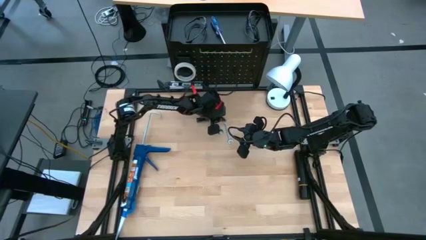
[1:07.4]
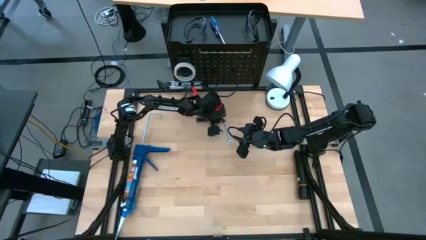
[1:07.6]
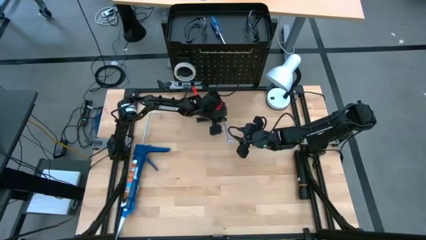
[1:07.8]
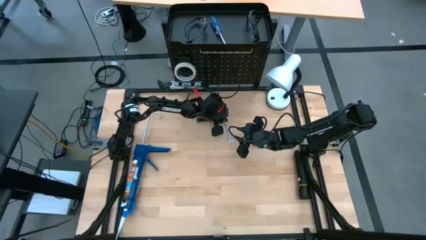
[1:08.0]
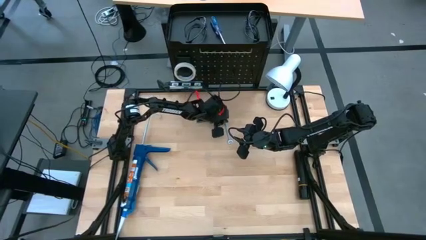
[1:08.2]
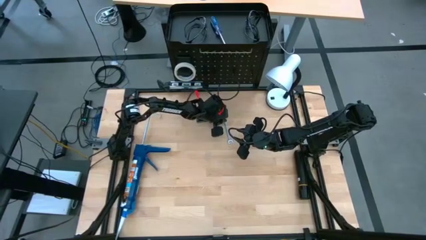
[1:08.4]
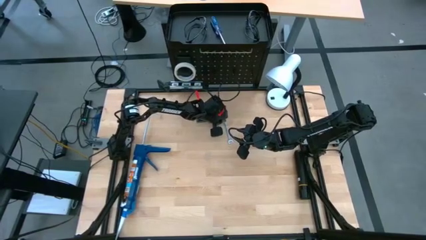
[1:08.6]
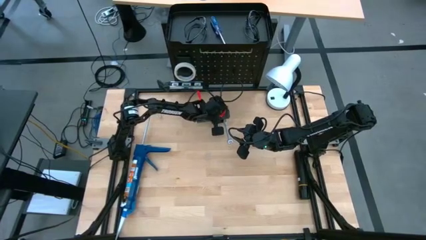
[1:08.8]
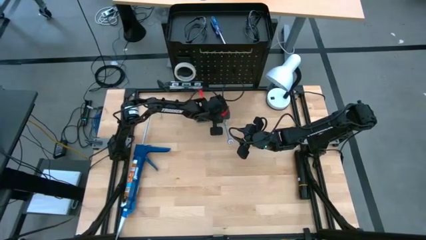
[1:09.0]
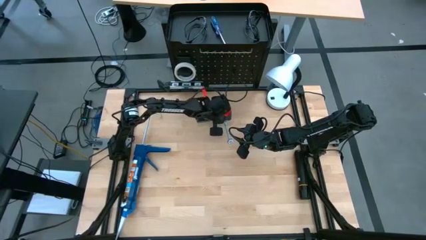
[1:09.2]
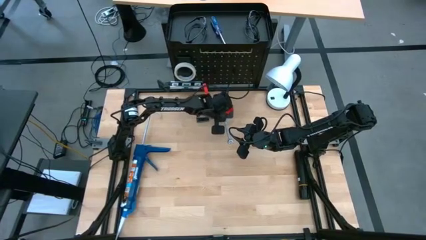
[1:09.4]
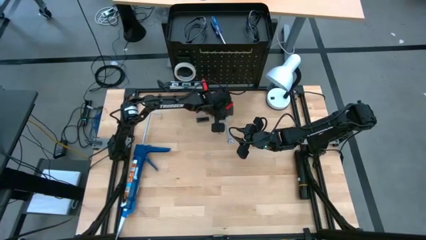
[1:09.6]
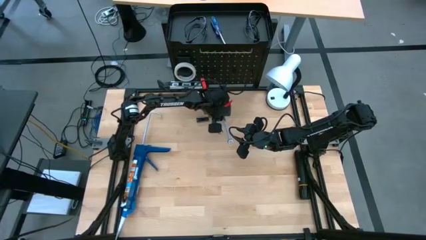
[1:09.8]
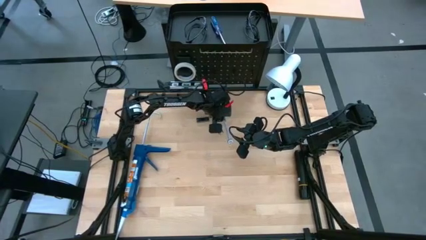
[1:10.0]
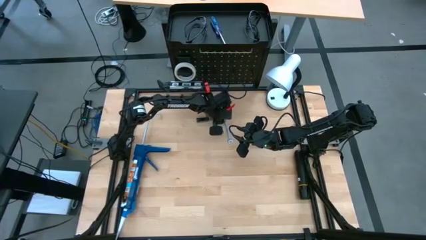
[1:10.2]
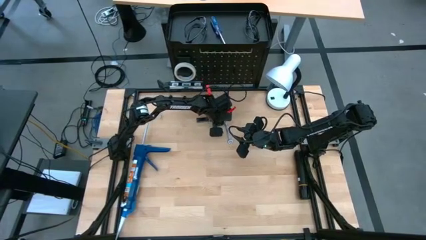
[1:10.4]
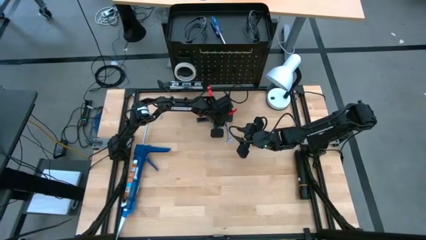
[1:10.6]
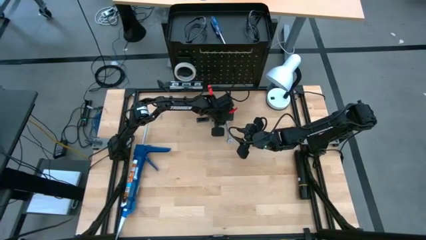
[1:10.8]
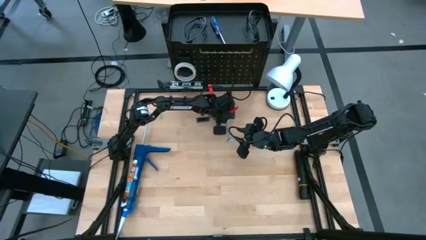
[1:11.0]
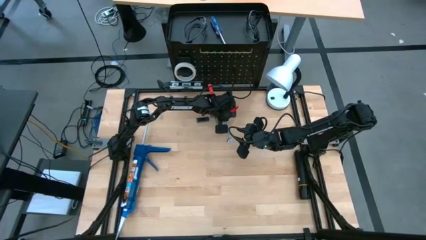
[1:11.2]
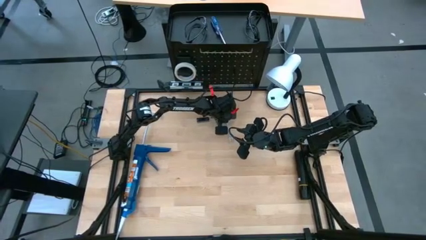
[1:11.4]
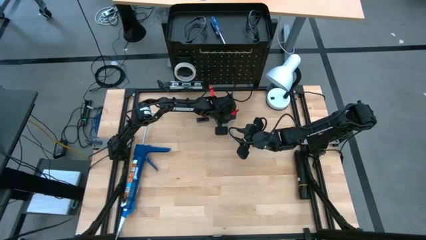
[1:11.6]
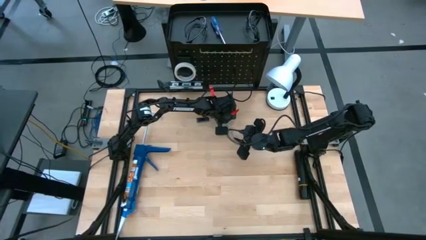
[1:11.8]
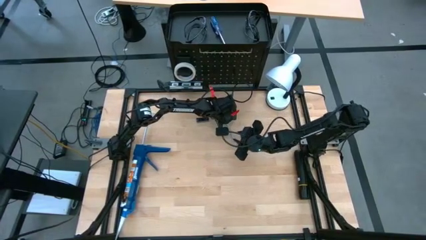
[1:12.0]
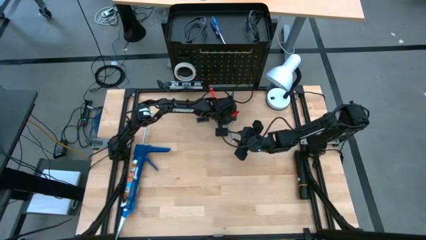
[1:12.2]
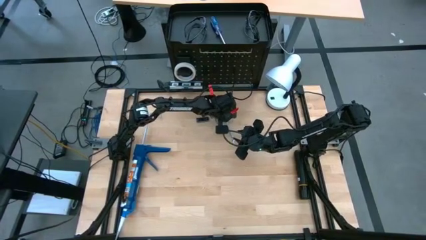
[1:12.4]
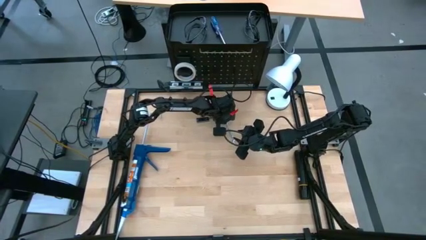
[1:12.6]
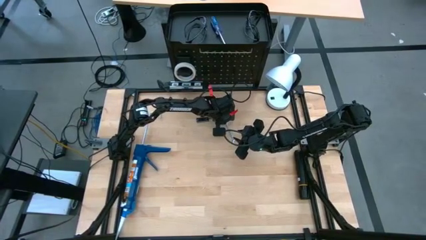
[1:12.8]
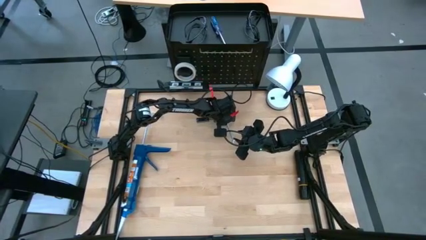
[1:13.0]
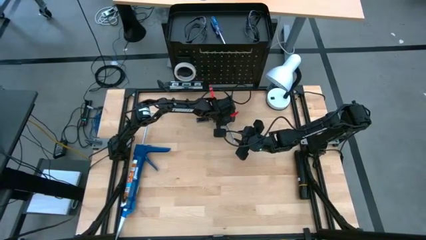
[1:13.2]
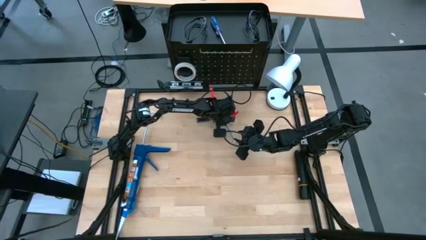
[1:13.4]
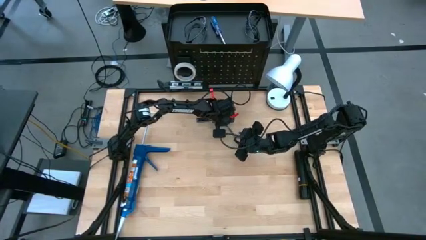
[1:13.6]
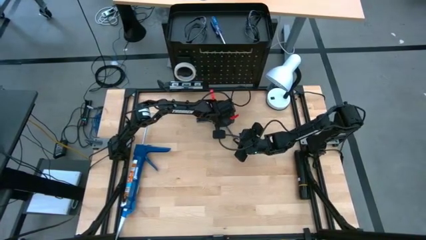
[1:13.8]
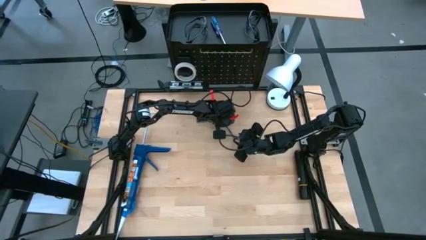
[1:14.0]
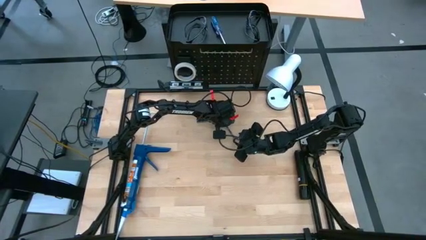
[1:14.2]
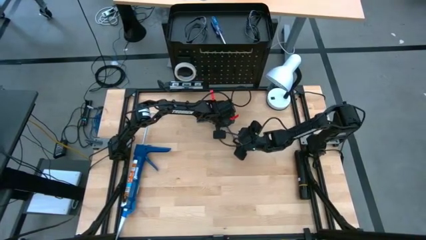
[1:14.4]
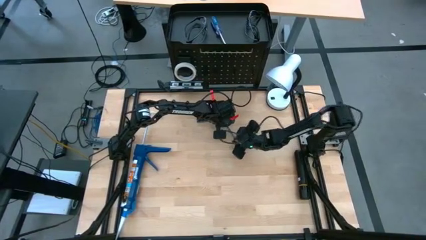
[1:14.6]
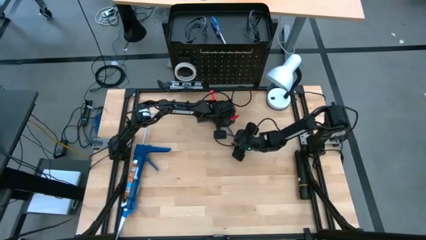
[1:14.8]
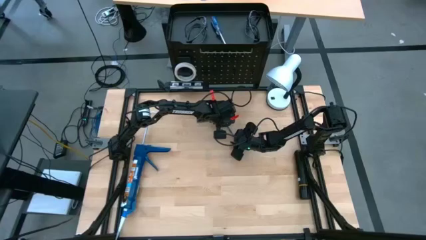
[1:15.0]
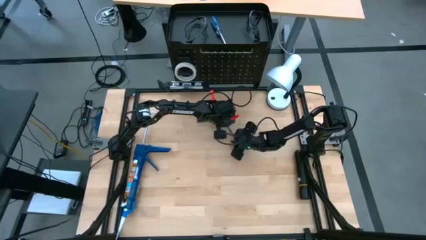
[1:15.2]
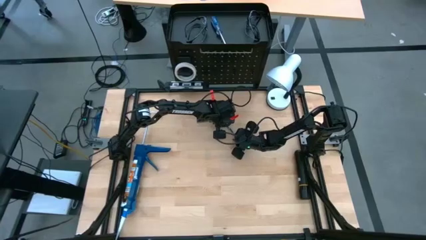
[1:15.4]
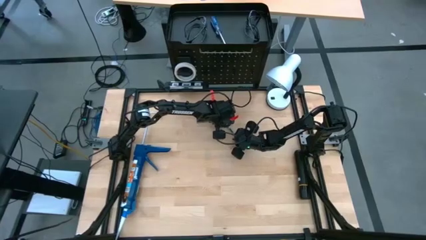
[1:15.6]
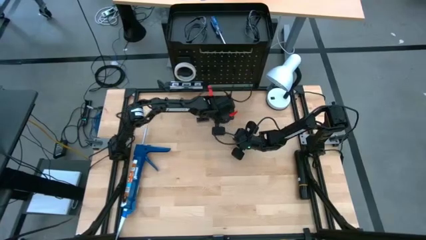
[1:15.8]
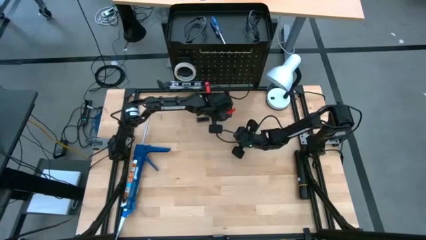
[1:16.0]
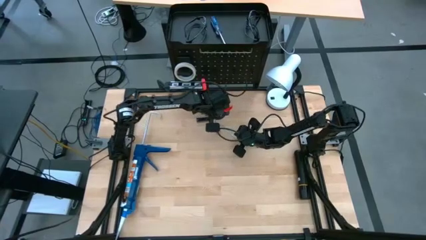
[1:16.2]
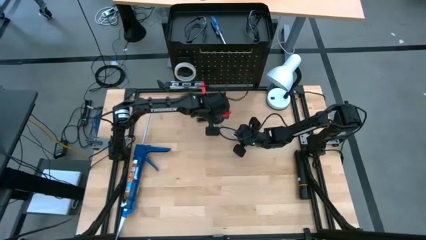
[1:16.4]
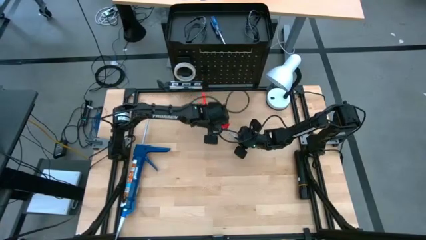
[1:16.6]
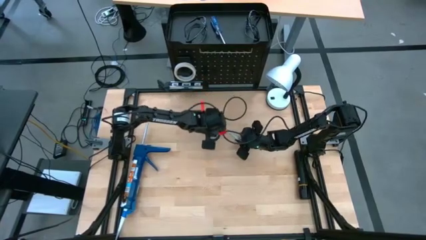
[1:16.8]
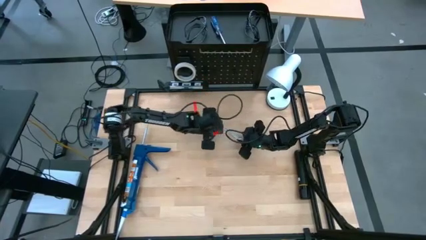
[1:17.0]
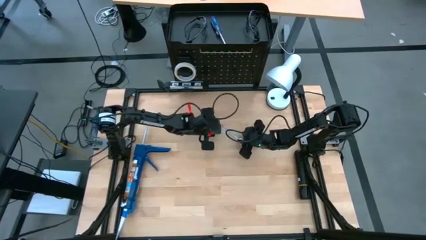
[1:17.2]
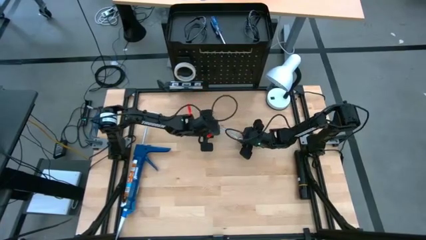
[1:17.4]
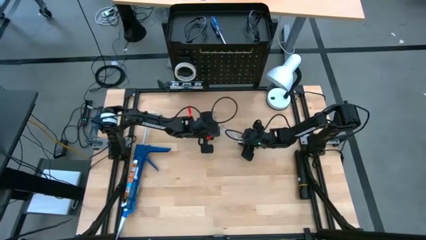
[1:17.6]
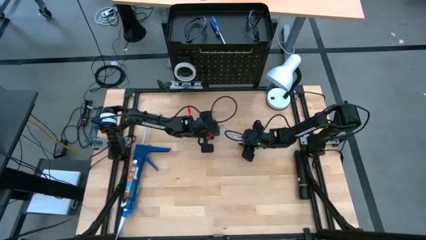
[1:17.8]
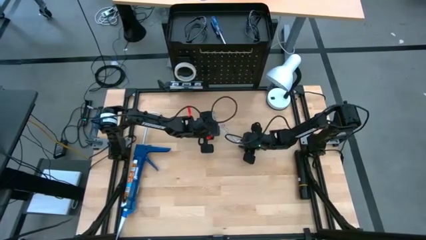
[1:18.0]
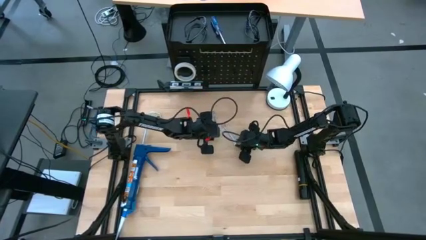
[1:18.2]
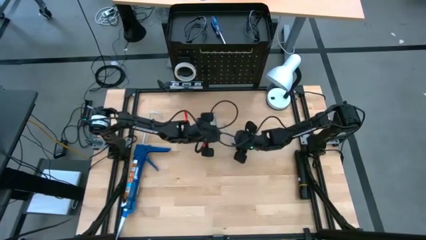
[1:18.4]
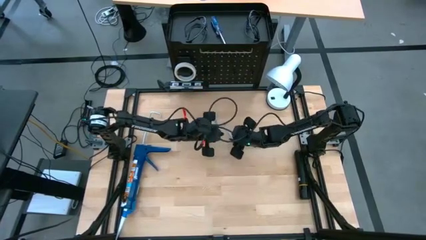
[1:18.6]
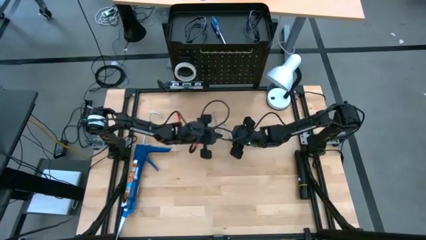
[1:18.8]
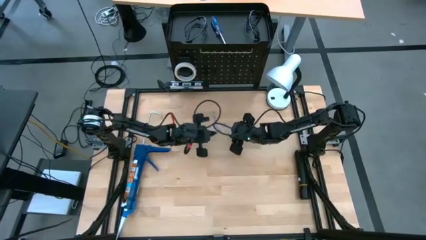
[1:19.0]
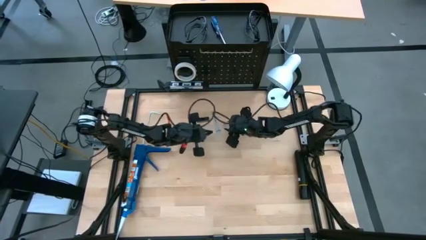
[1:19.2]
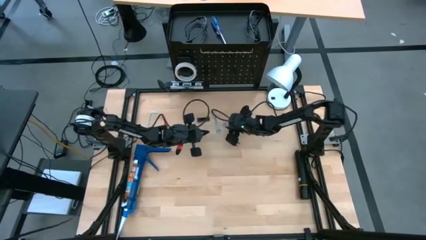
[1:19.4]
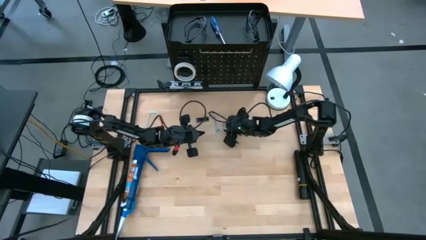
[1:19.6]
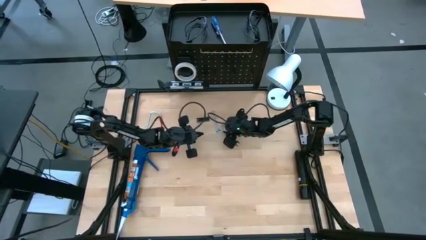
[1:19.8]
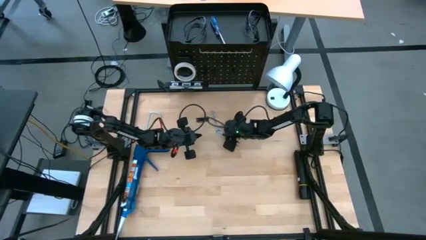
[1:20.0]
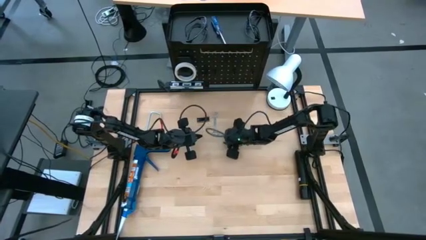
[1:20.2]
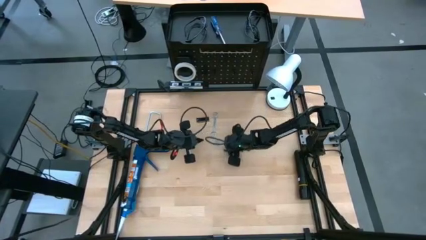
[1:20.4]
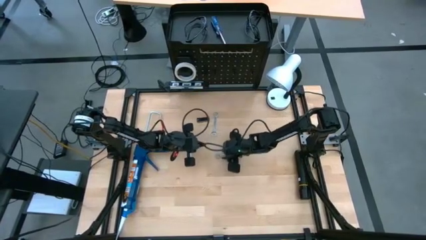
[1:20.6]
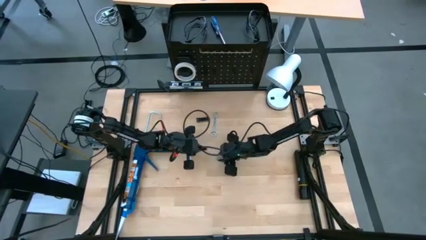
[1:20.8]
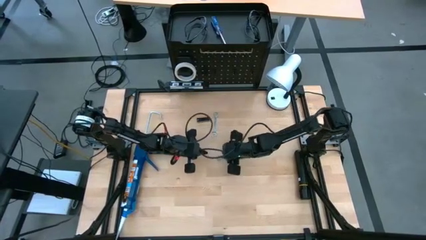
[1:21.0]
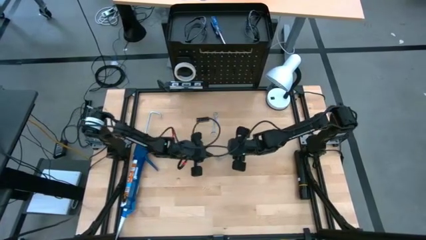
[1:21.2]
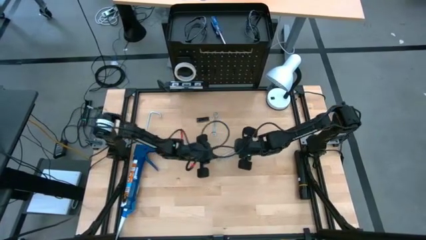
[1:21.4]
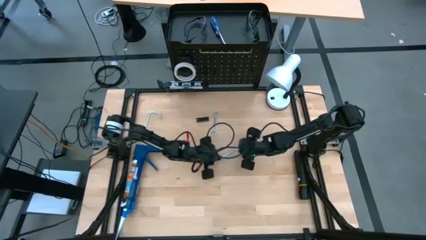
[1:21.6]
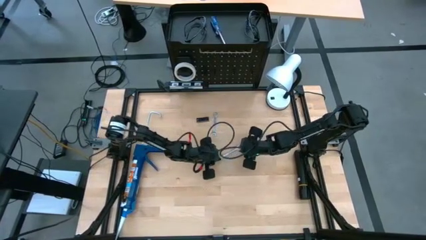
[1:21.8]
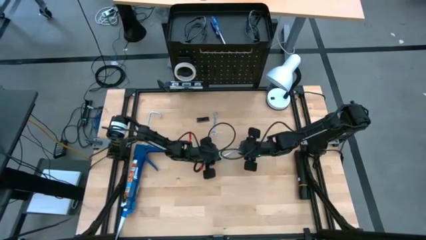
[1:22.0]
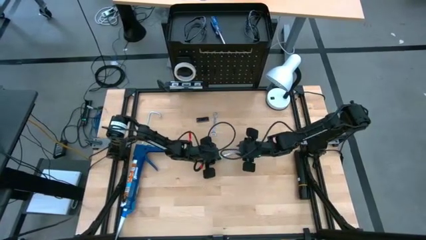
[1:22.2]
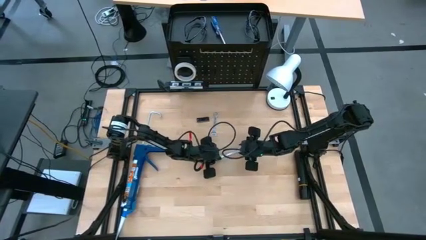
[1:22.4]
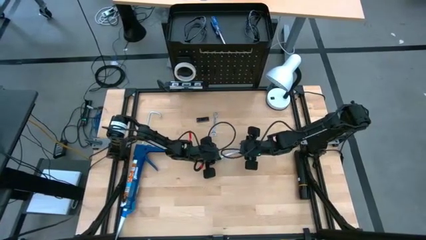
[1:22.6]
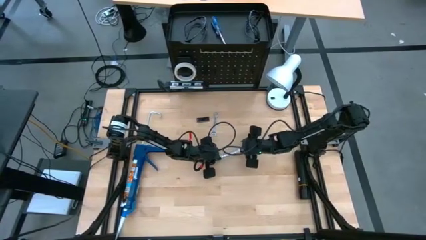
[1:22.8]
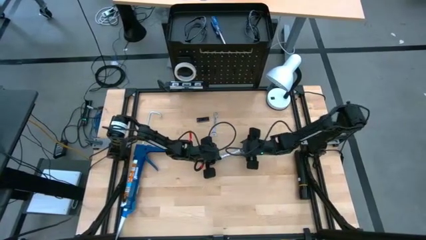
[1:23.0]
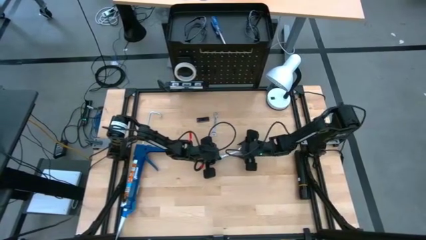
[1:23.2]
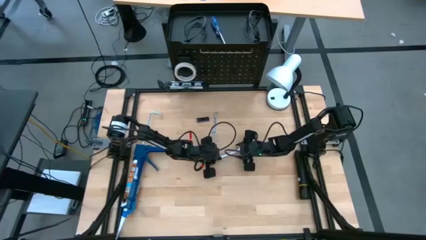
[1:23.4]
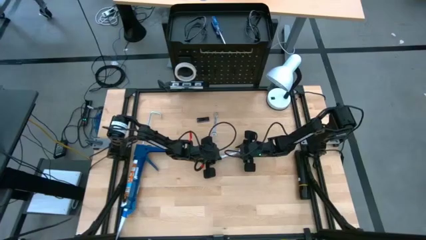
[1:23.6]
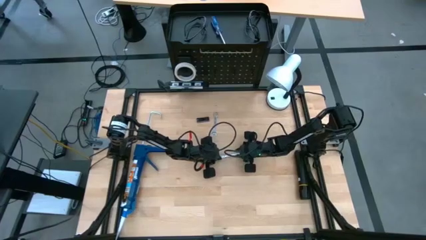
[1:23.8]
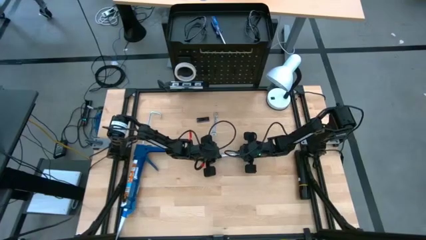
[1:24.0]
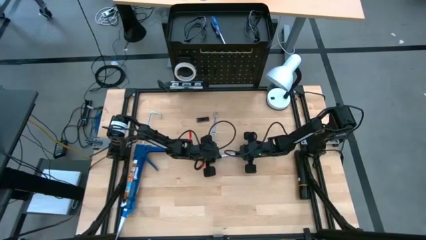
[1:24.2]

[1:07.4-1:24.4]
Task: Hang tools onto peg board
Hang the right wrench on the pegboard
